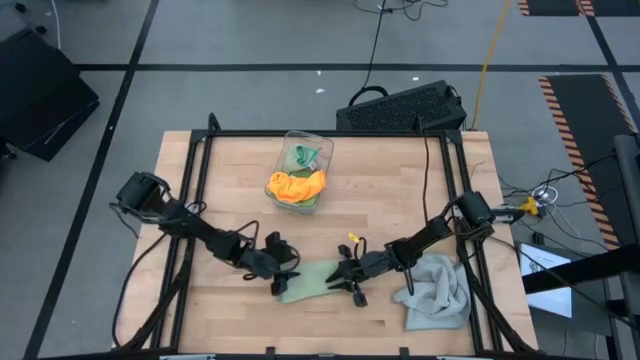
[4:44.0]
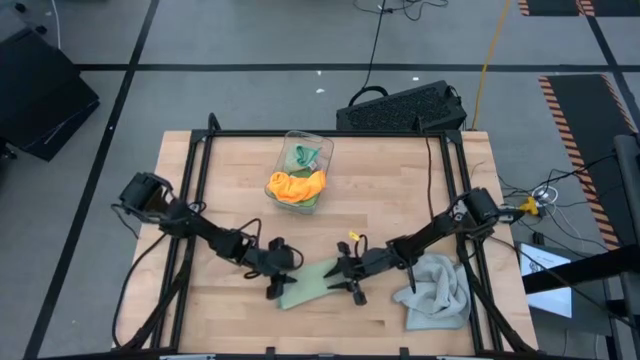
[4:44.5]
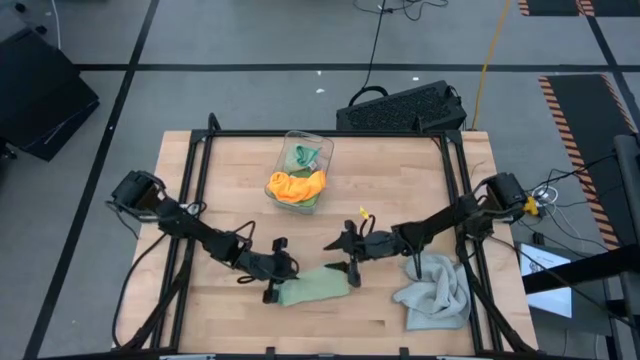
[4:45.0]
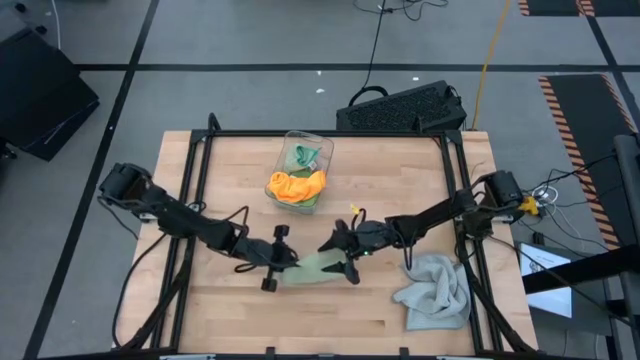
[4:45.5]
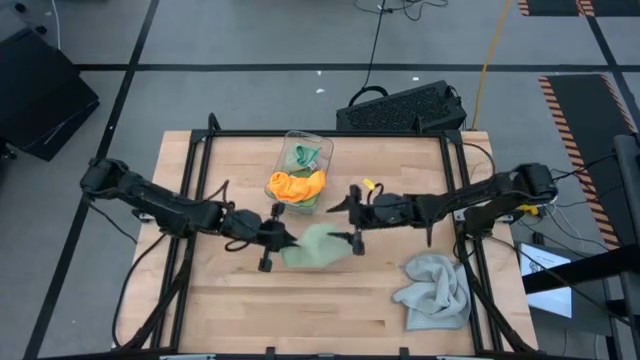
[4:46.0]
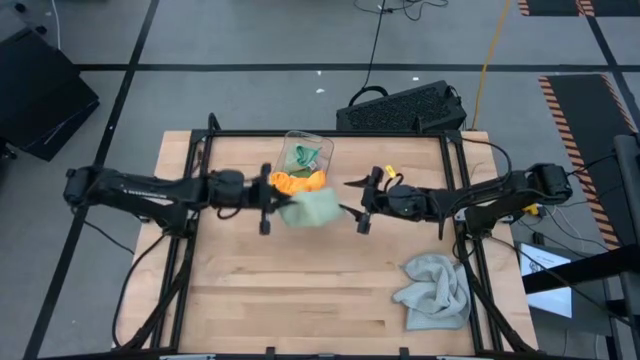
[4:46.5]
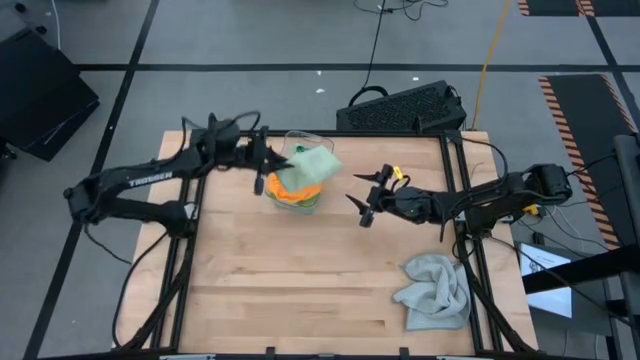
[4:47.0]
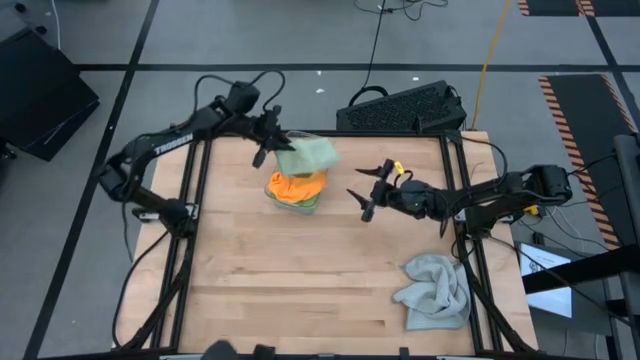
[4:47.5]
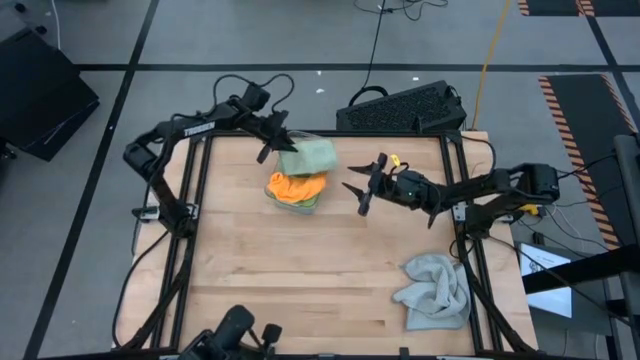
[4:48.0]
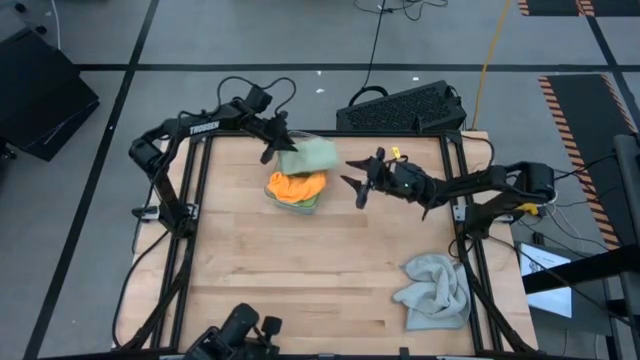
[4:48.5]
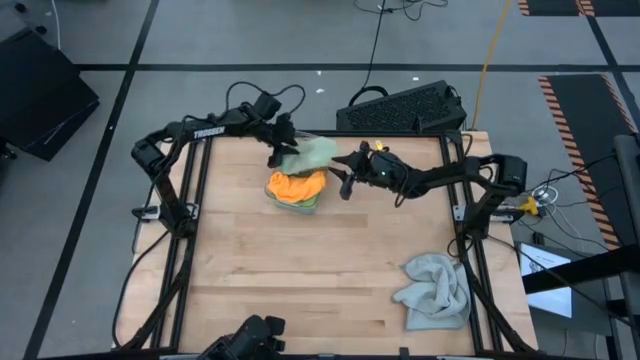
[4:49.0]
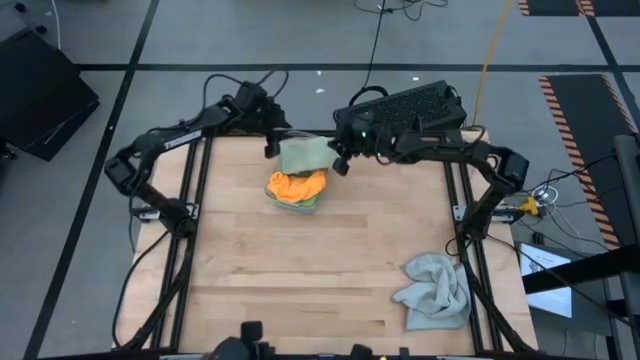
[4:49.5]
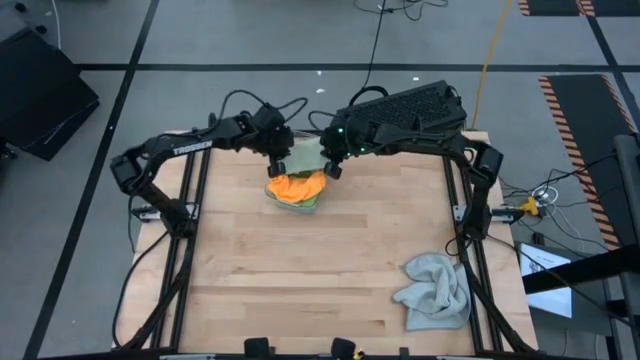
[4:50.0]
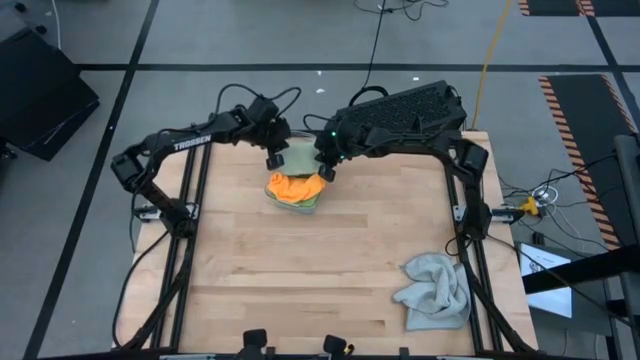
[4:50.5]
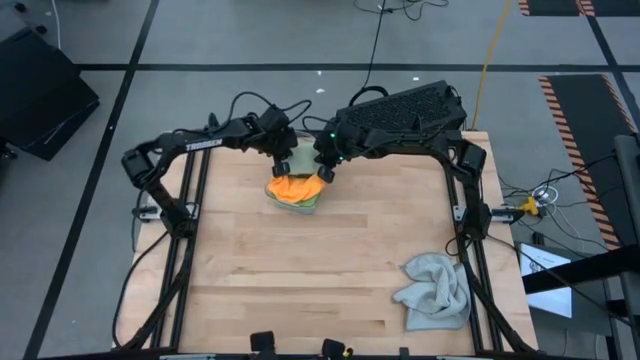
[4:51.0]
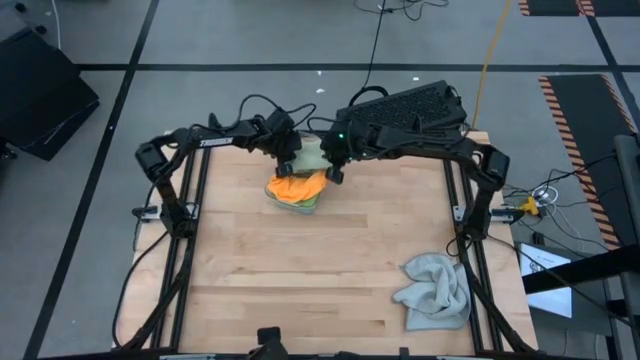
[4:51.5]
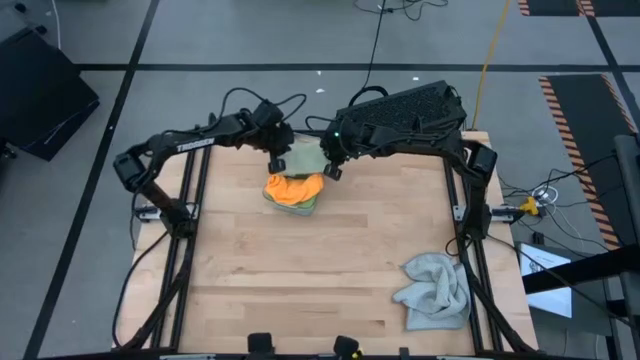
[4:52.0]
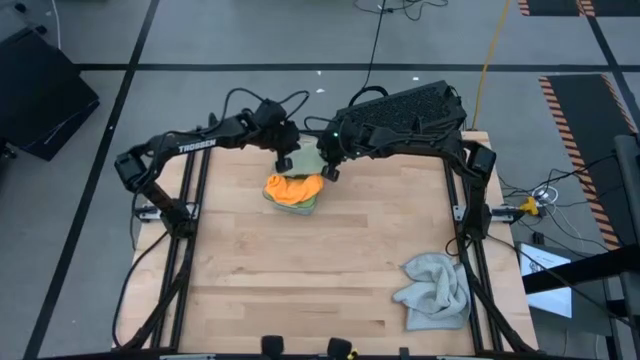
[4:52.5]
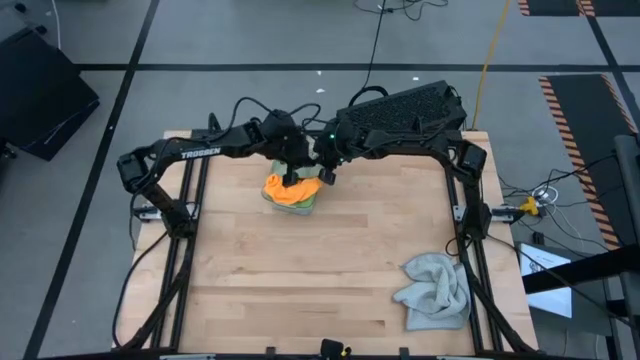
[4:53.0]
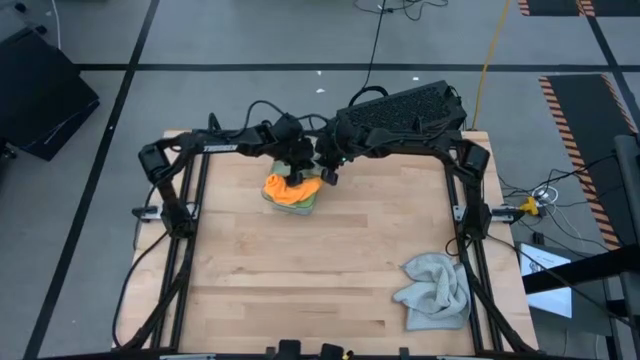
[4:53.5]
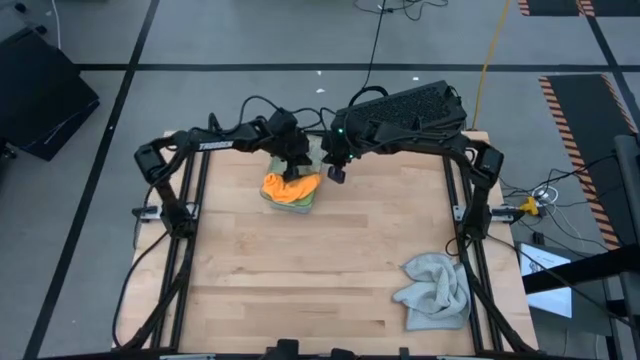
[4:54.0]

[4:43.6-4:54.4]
Task: Fold microfiber towels
Put the folded light green towel into the bin

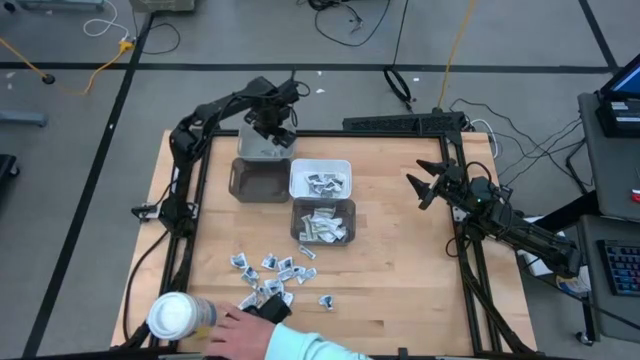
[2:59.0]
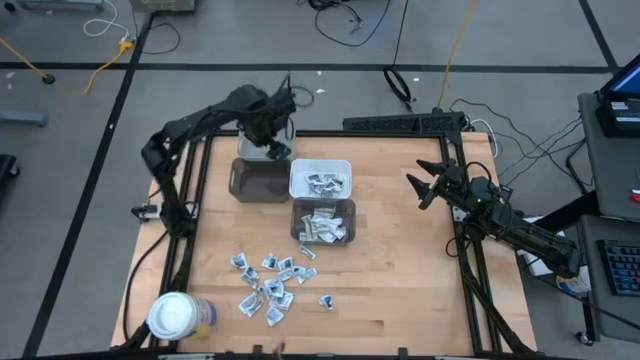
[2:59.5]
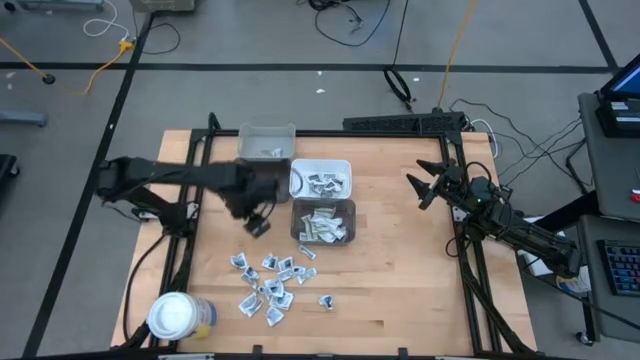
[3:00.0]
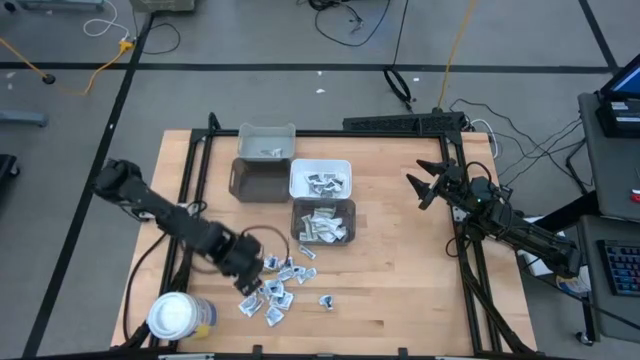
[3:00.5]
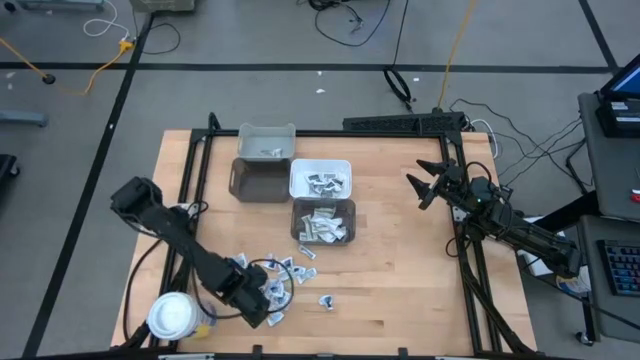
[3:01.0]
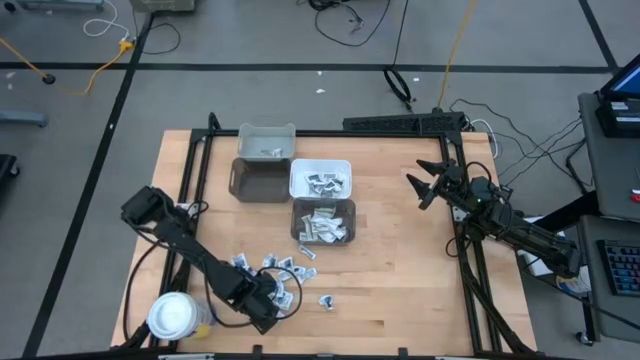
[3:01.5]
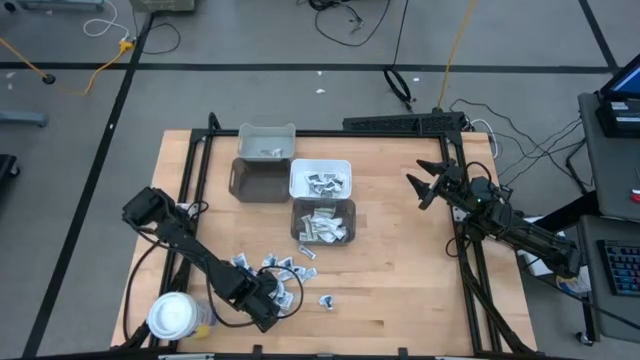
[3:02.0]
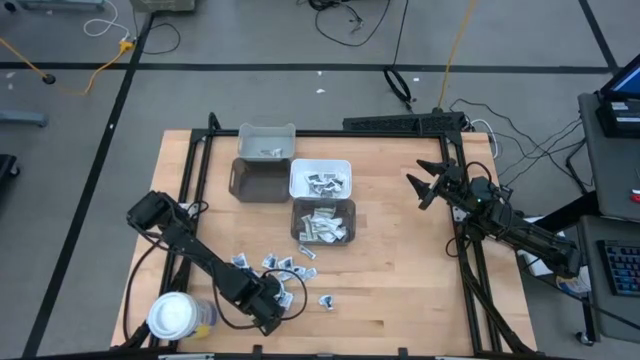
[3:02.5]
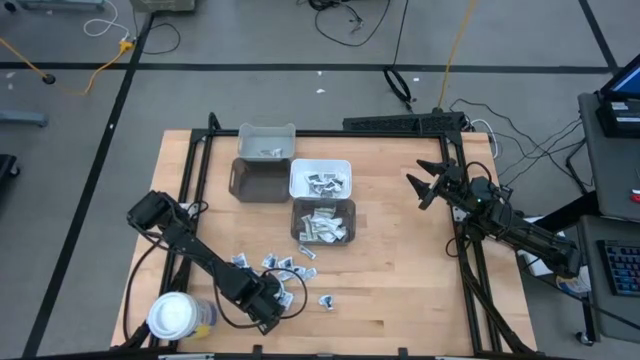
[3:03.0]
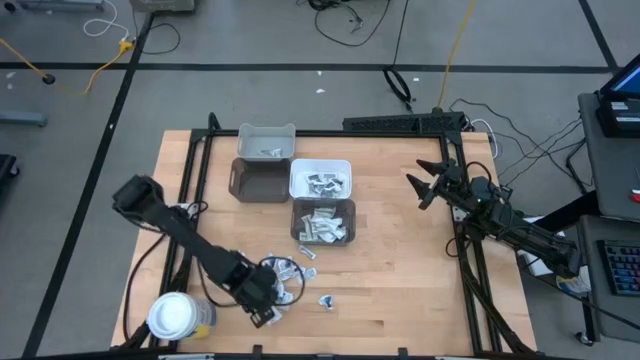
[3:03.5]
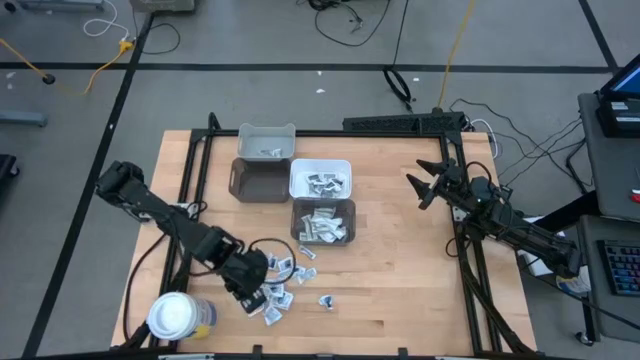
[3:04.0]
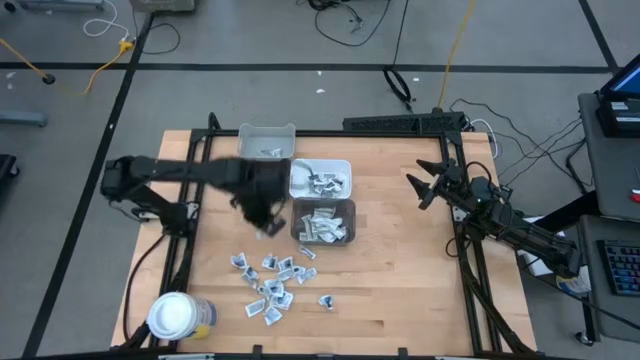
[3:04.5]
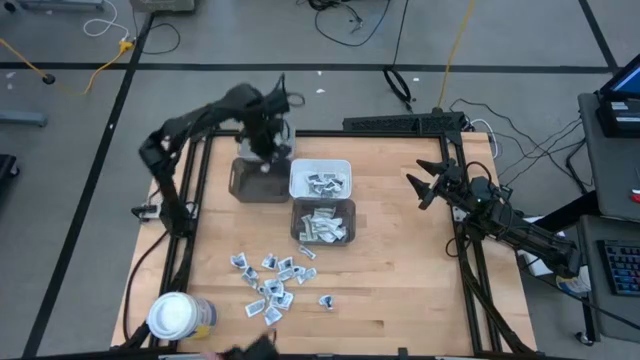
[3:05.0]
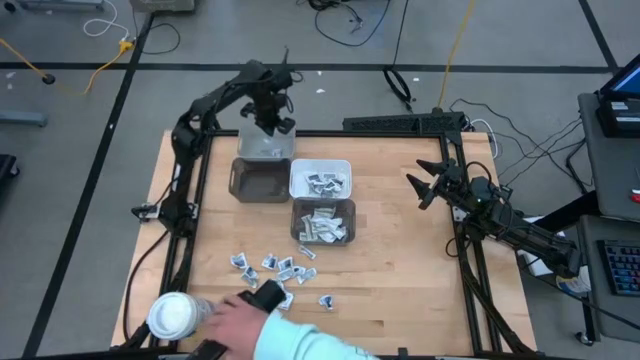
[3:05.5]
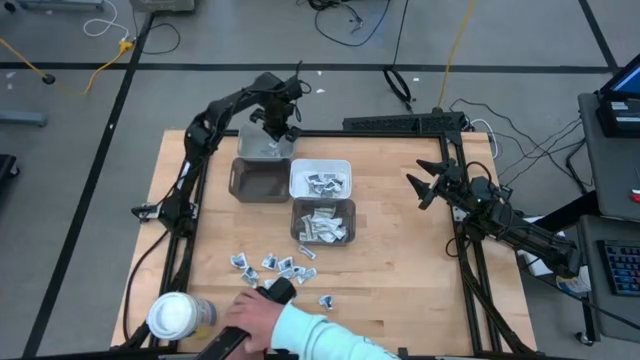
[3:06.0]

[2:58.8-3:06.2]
Task: Pick & Place First Aid Supplies
Put the orange ointment pack into the gray bin
